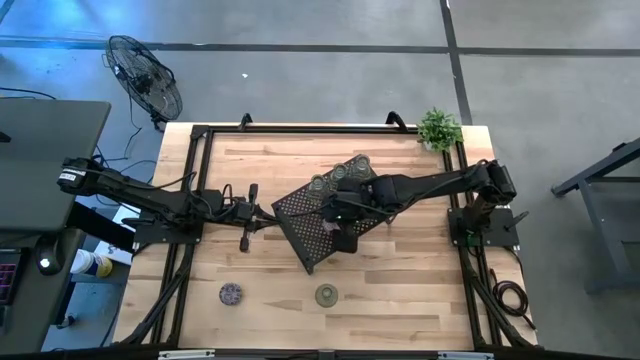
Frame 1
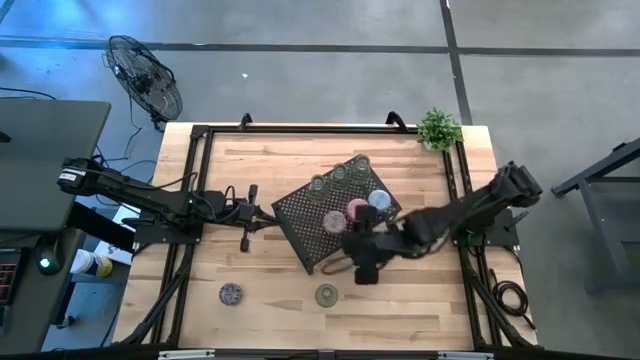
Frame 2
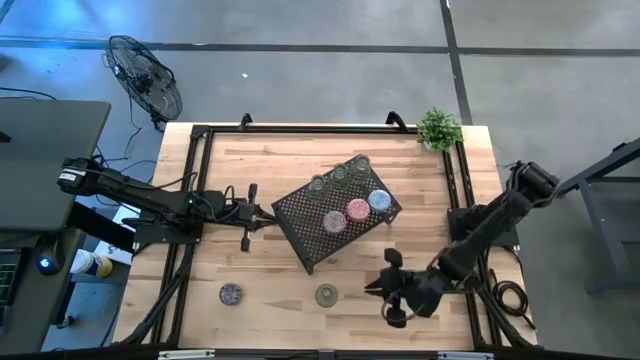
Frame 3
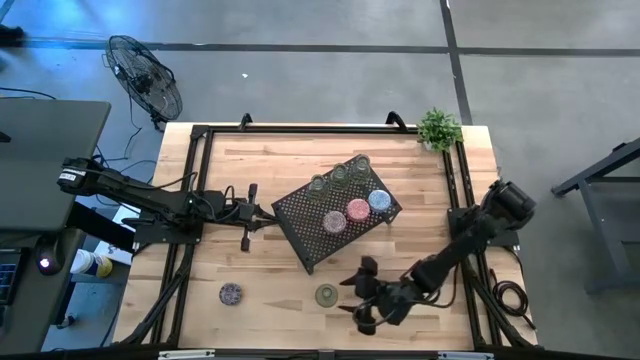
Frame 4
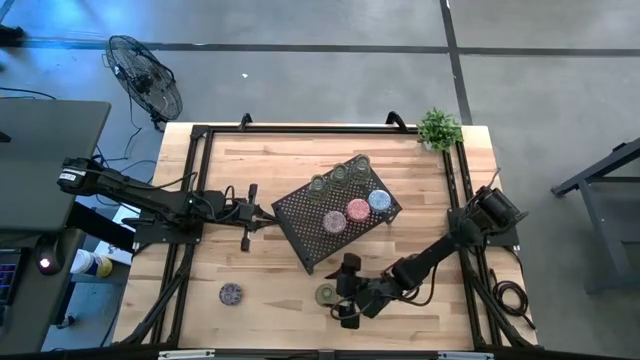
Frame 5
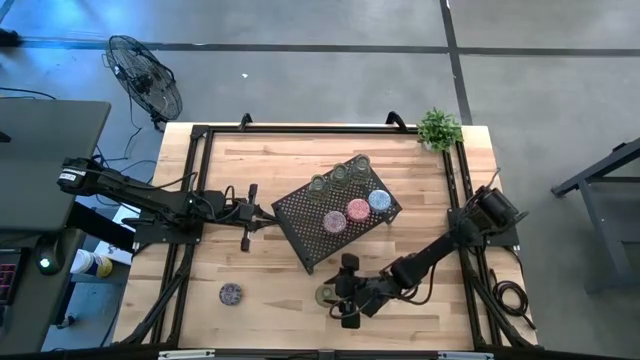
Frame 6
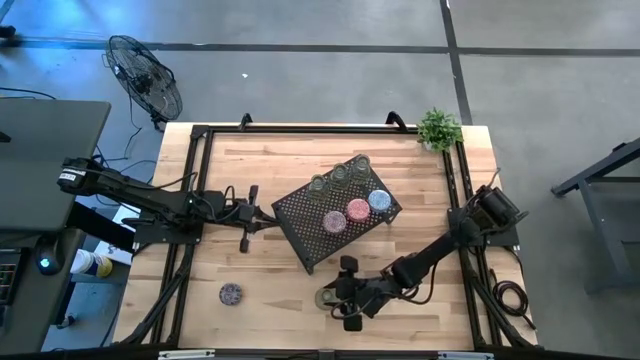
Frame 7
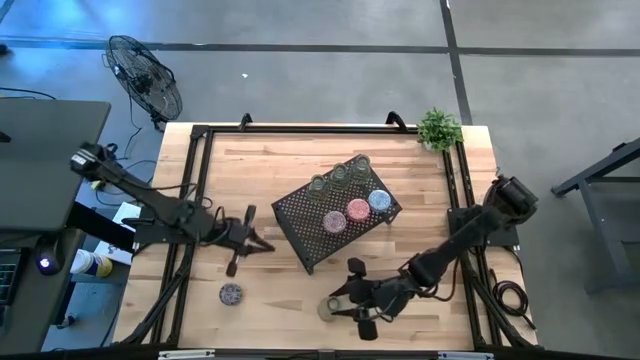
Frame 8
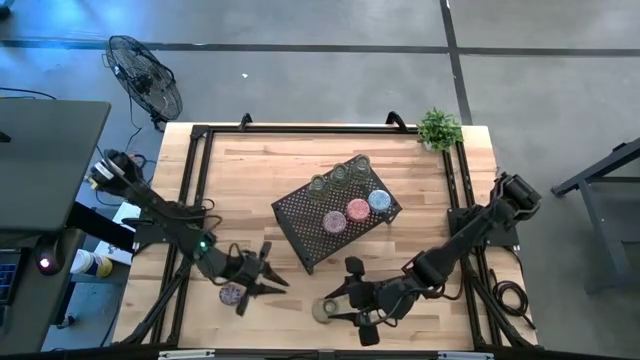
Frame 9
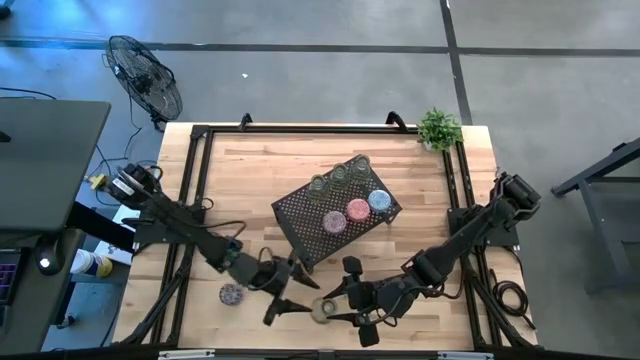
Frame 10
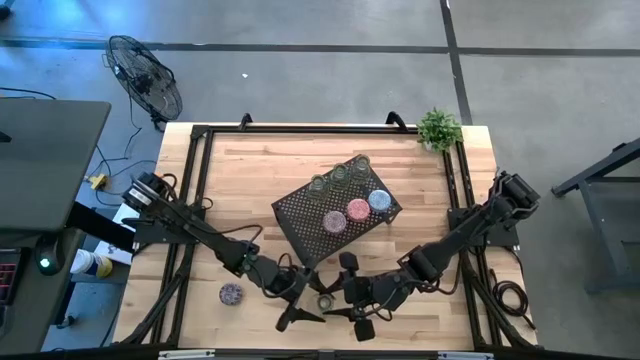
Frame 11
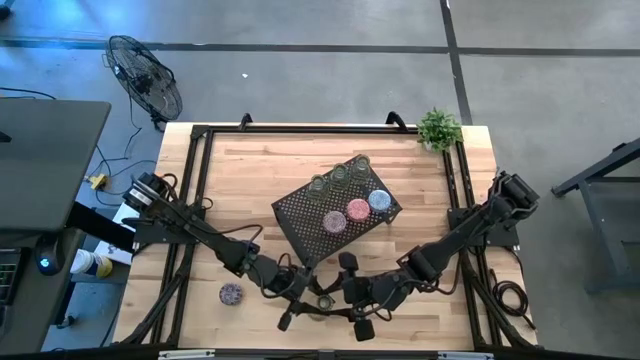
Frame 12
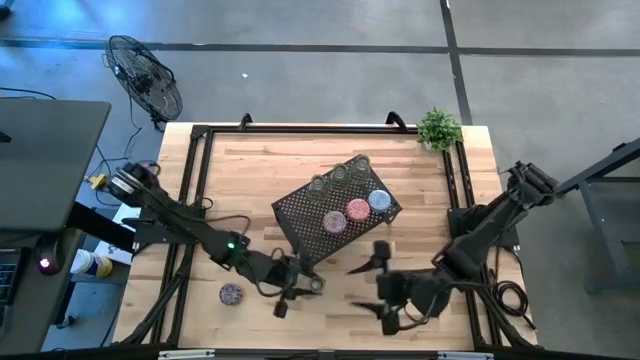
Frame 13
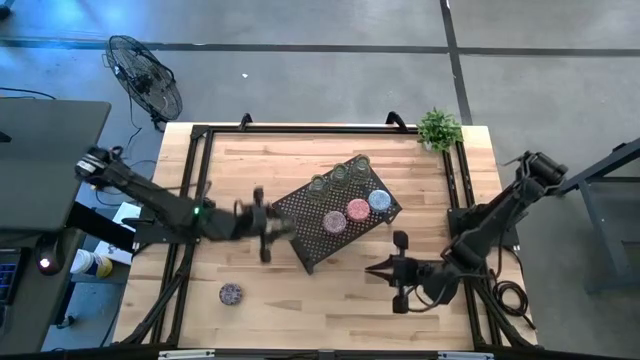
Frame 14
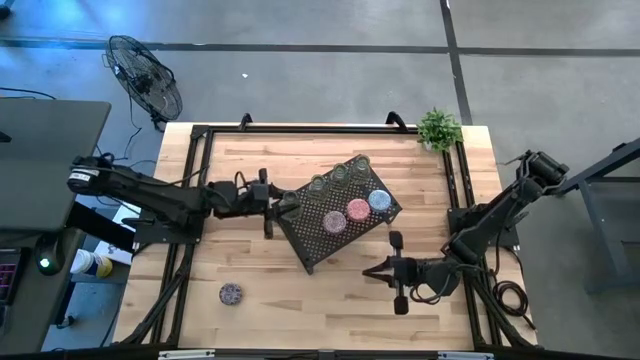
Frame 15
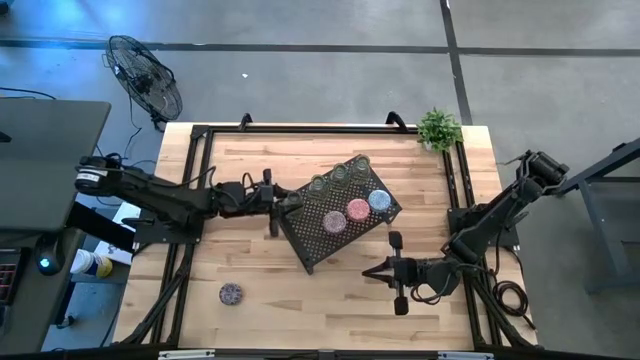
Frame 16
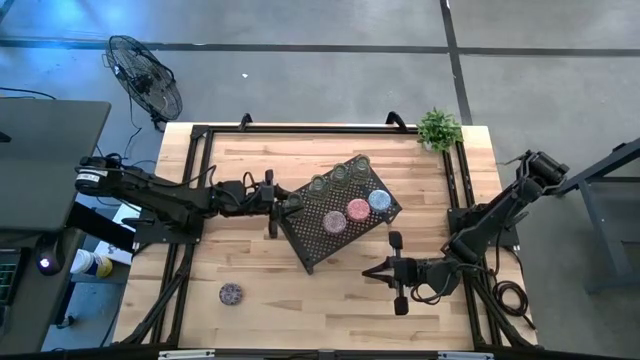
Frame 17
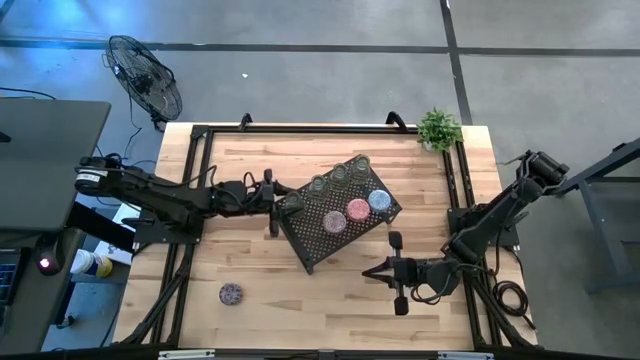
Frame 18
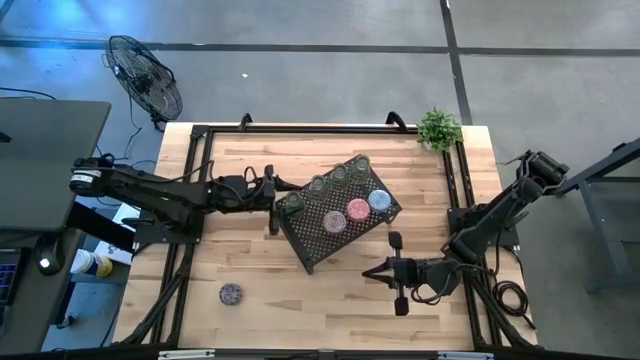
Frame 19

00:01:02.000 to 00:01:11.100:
Task: Pick & Place candle stick holders
Put the green glass candle holder on the shelf

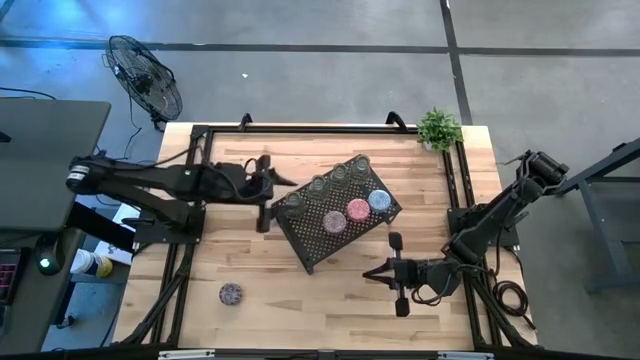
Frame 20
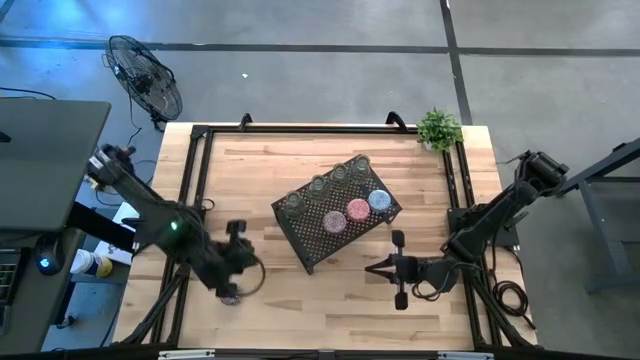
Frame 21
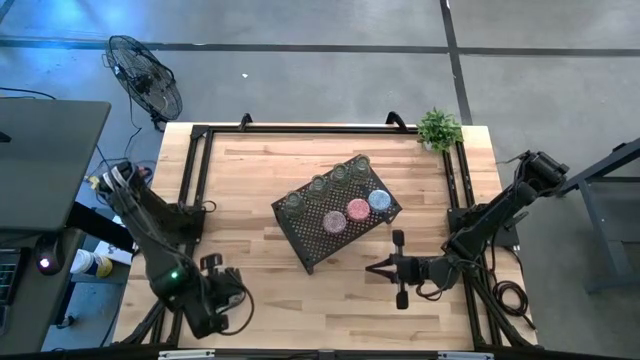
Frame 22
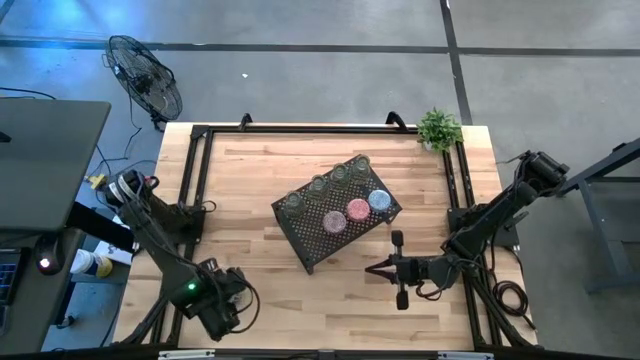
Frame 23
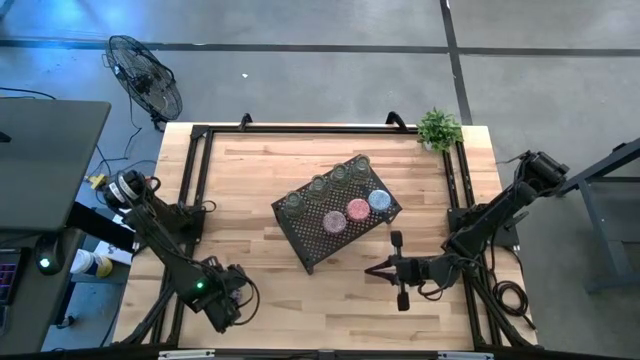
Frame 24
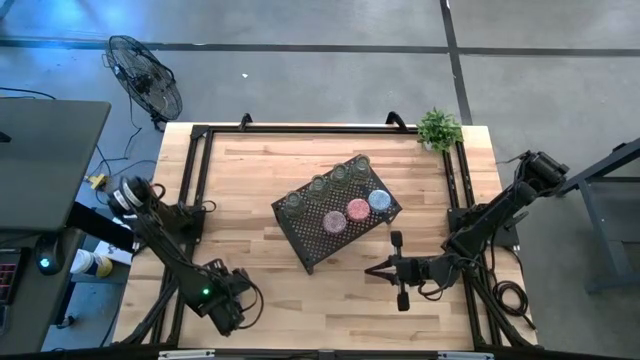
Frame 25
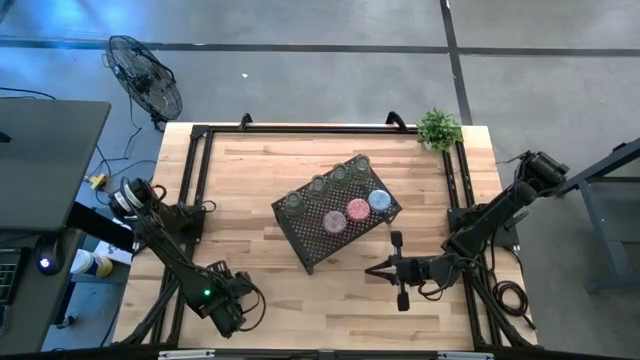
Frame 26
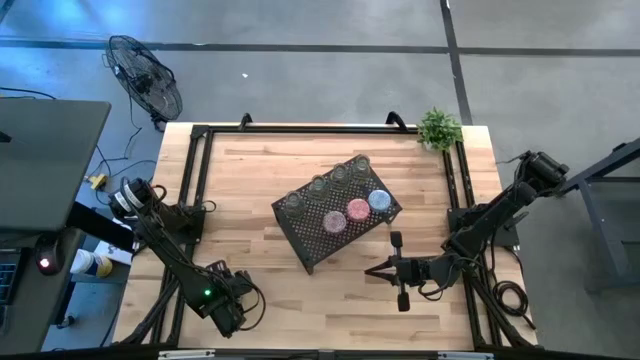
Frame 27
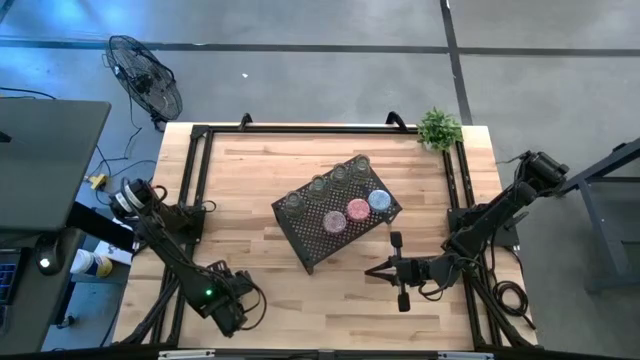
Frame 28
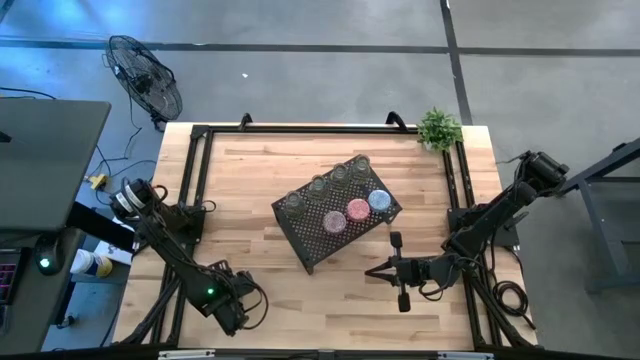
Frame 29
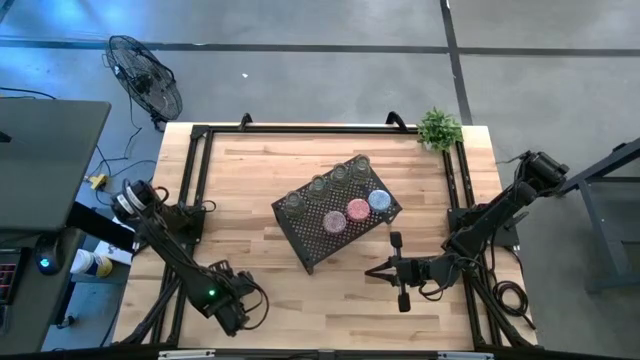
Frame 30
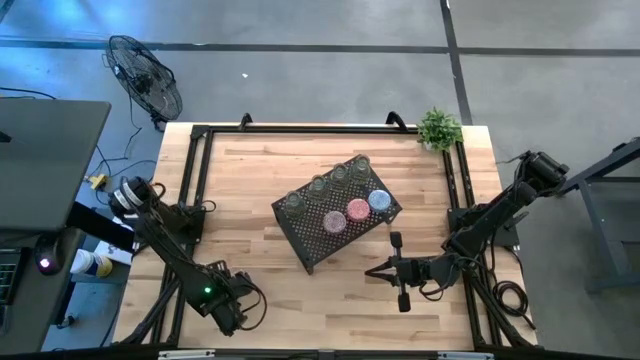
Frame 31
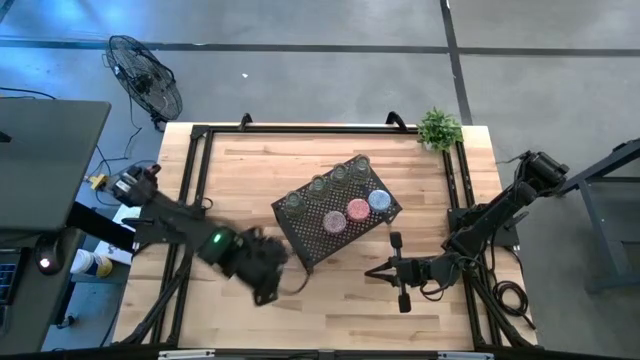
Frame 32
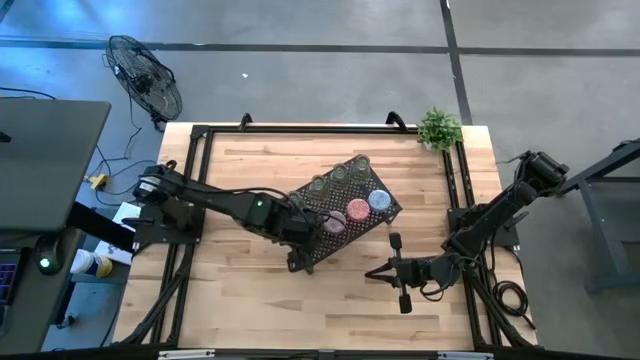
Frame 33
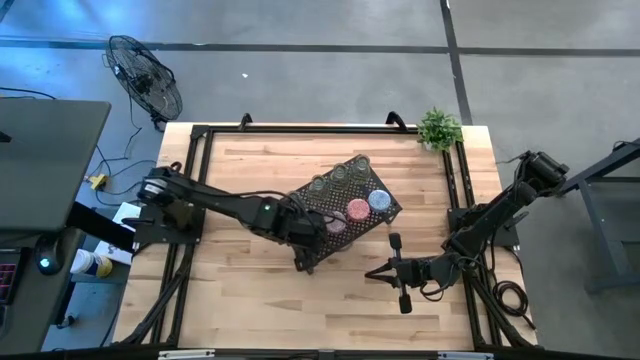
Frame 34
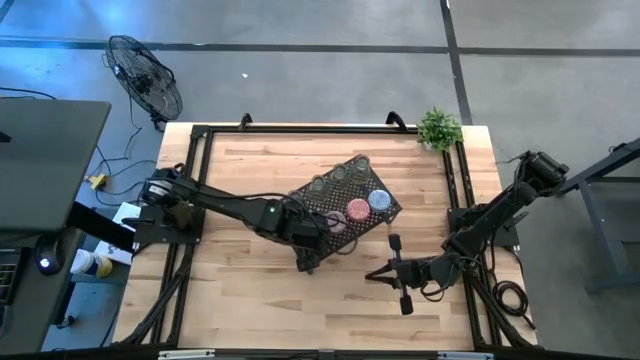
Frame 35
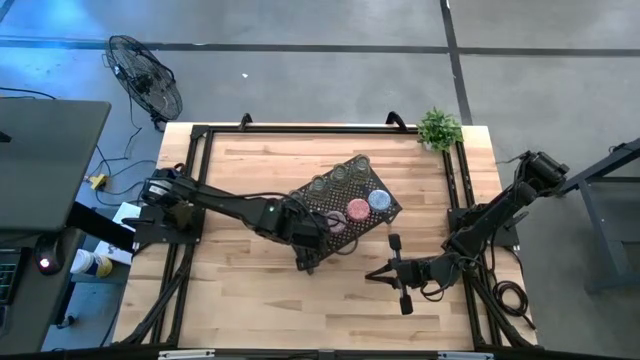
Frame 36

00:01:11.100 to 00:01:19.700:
Put the black scented candle on the shelf

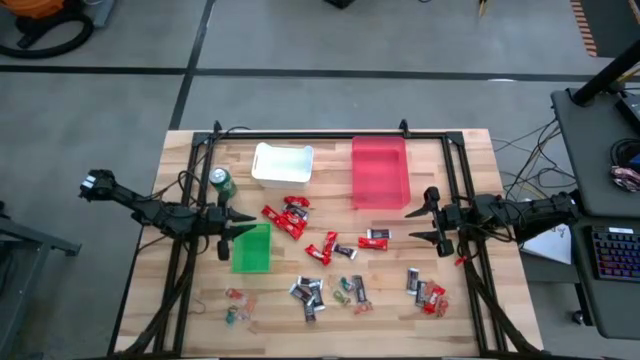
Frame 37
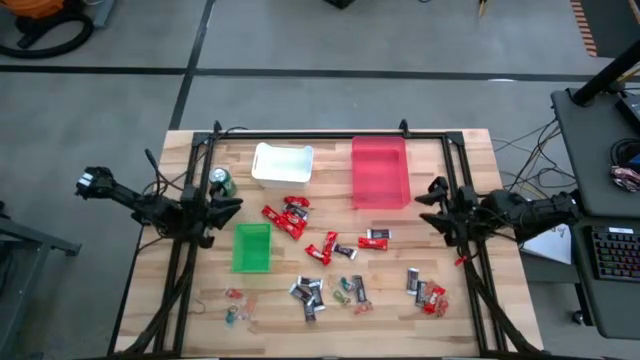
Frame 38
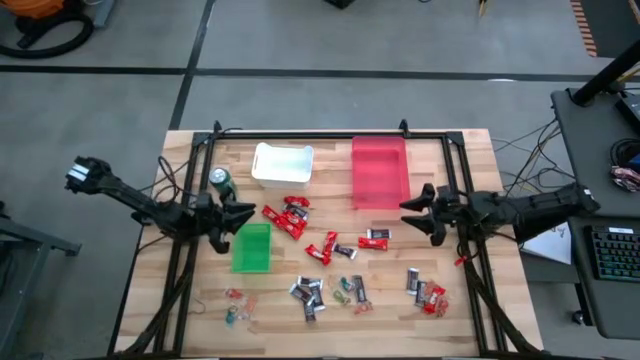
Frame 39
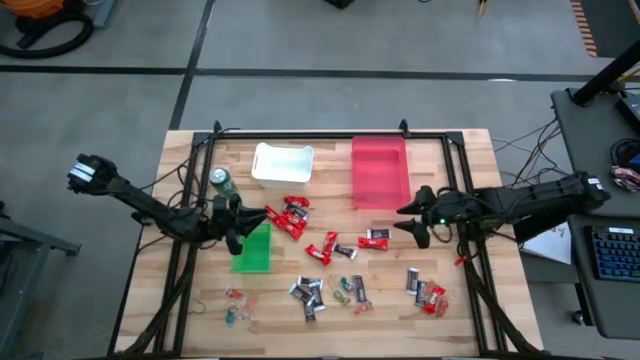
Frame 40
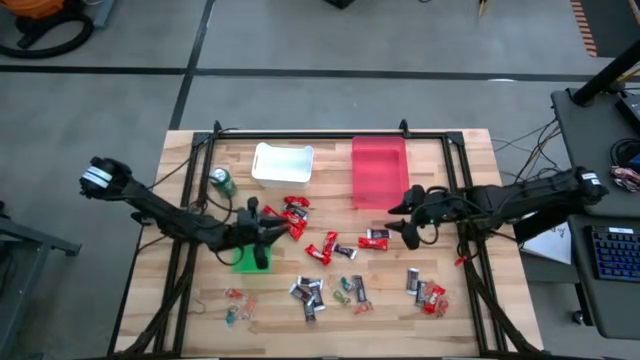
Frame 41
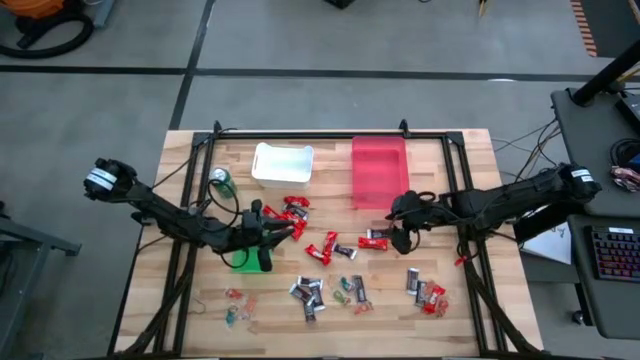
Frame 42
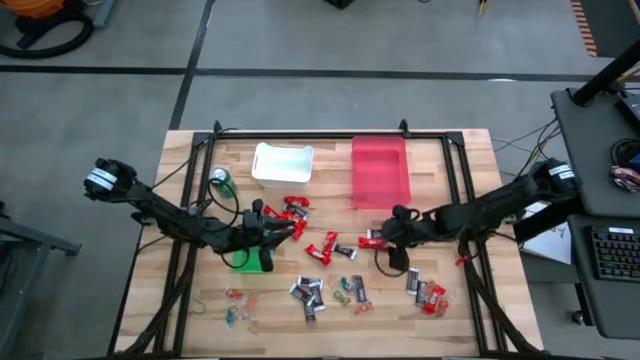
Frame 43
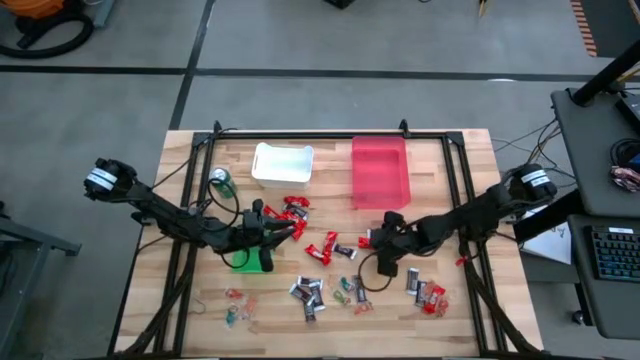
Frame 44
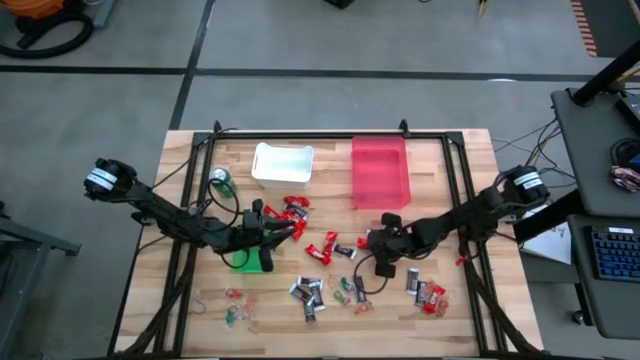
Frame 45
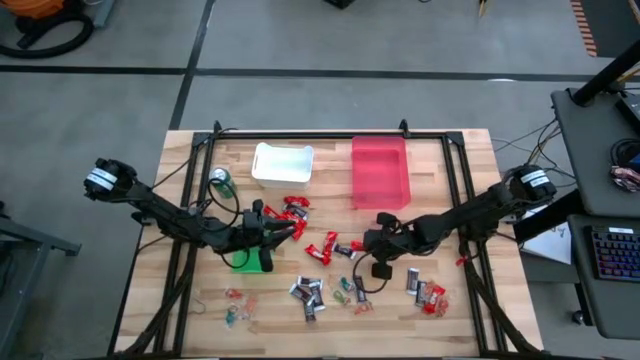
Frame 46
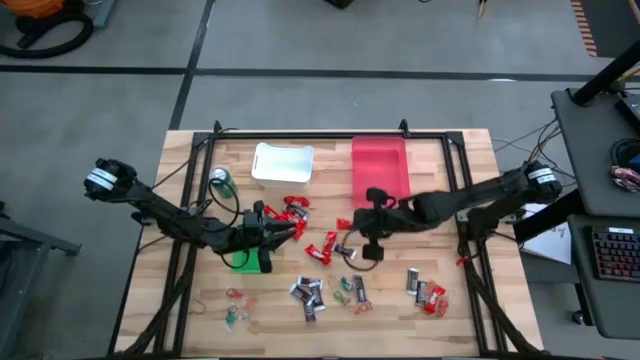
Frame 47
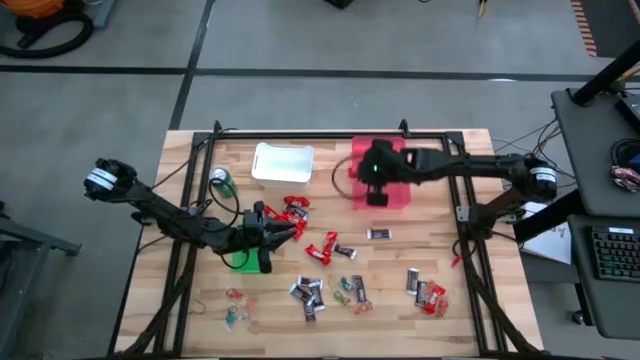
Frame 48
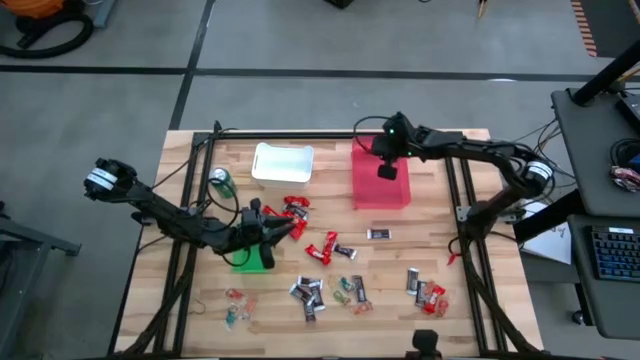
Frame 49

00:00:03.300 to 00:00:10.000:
Task: Organize candy in baskets
Put the red chocolate into the pink bin
